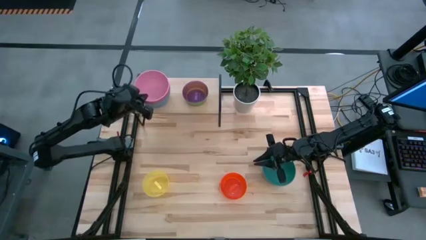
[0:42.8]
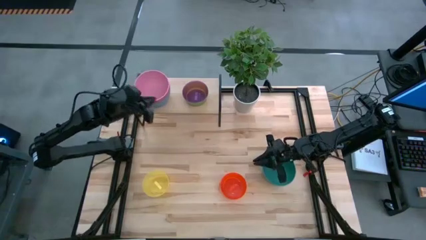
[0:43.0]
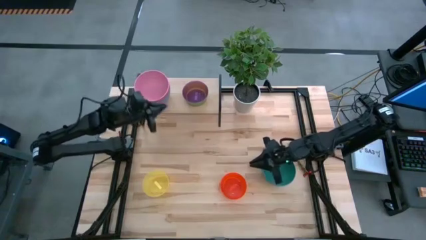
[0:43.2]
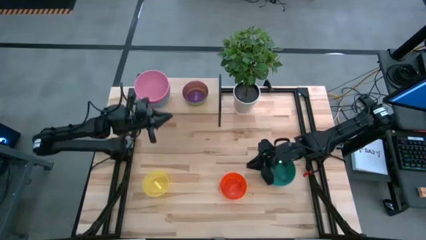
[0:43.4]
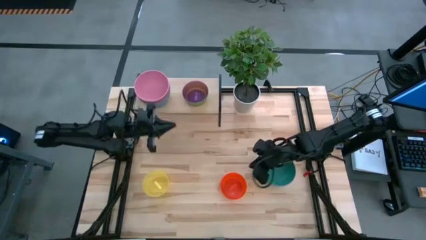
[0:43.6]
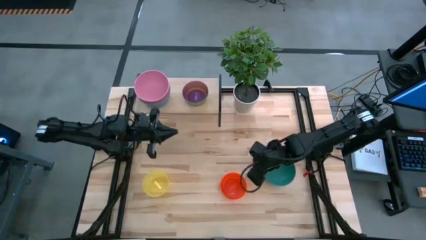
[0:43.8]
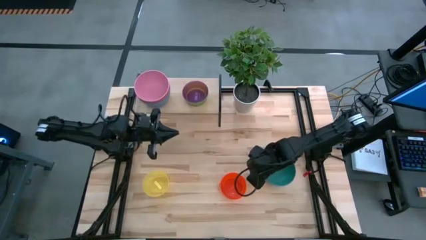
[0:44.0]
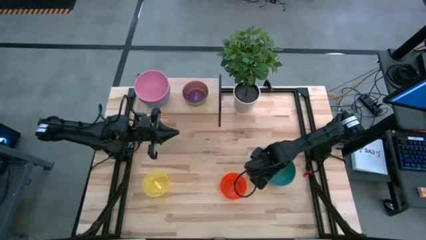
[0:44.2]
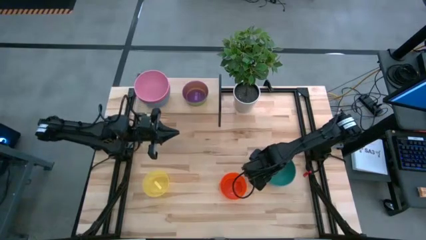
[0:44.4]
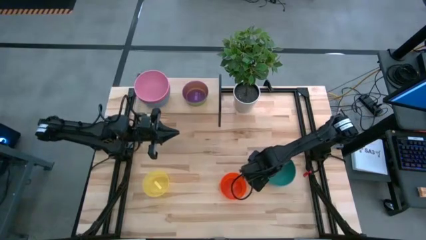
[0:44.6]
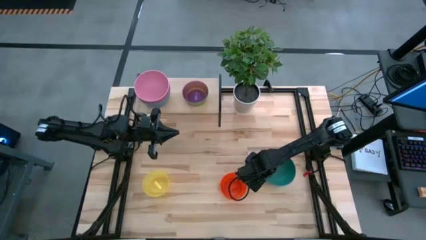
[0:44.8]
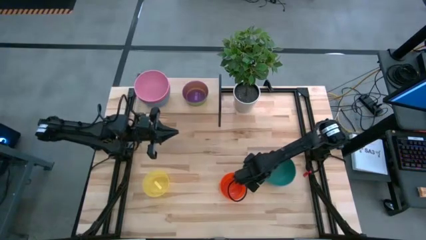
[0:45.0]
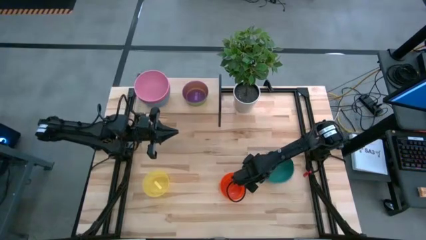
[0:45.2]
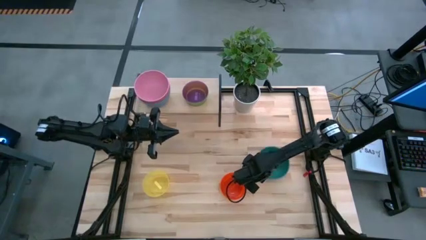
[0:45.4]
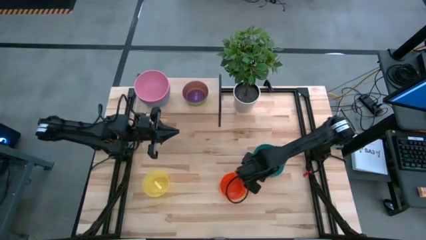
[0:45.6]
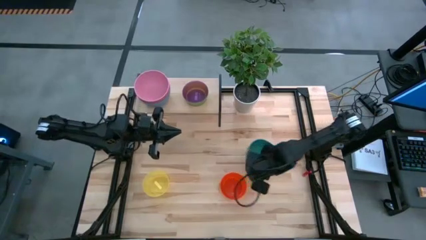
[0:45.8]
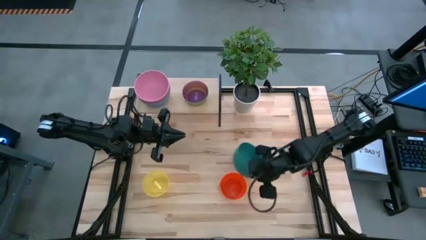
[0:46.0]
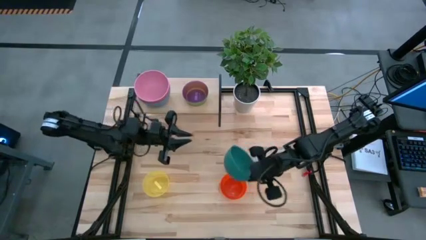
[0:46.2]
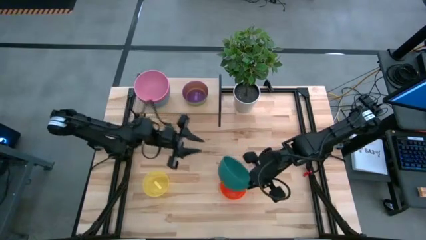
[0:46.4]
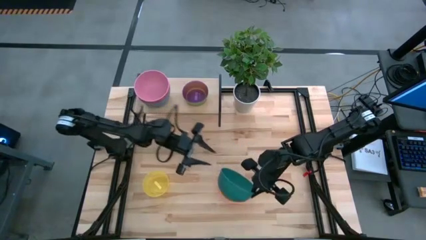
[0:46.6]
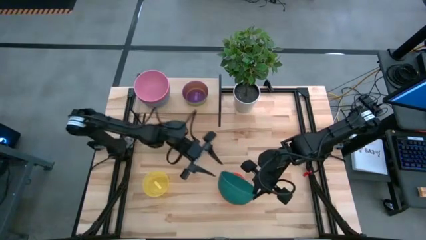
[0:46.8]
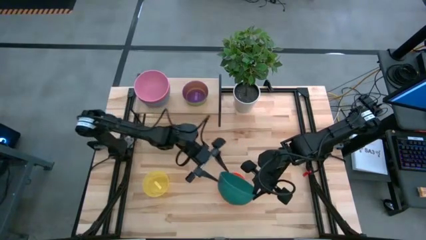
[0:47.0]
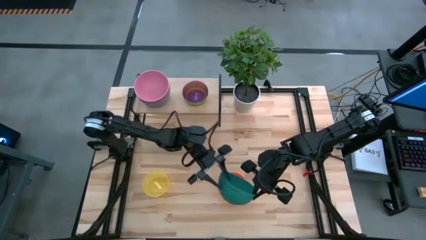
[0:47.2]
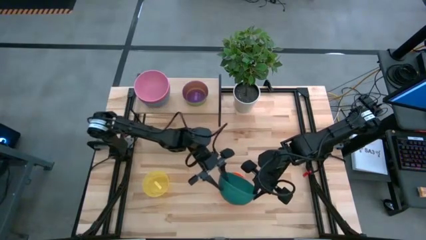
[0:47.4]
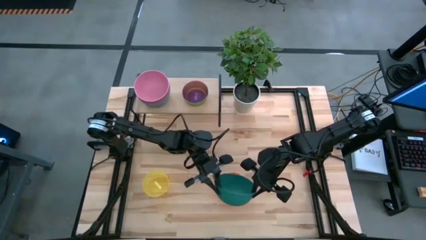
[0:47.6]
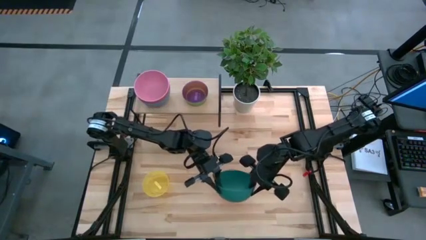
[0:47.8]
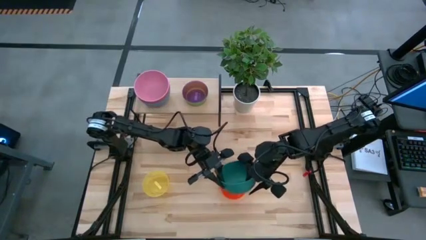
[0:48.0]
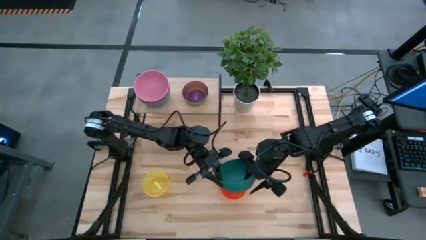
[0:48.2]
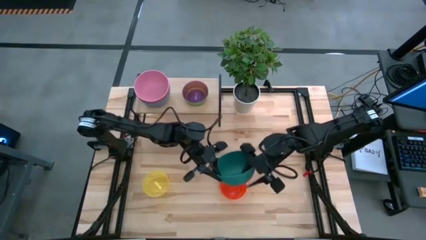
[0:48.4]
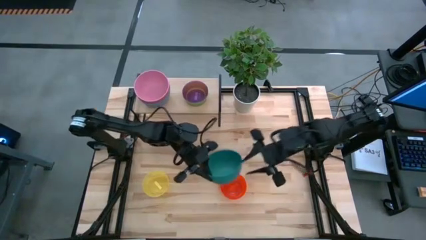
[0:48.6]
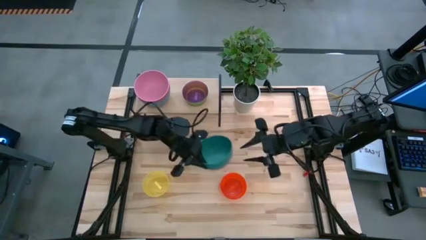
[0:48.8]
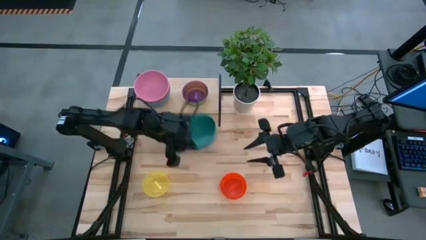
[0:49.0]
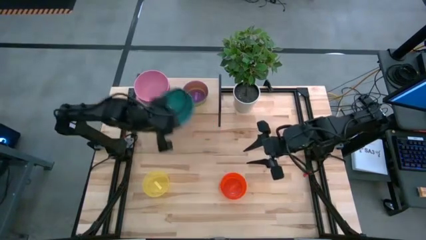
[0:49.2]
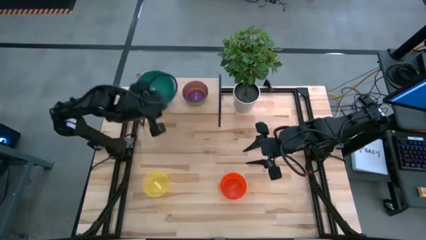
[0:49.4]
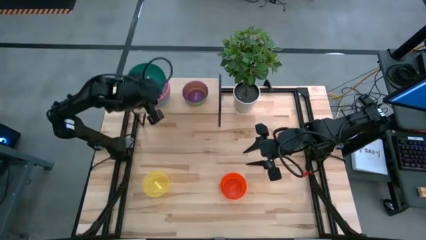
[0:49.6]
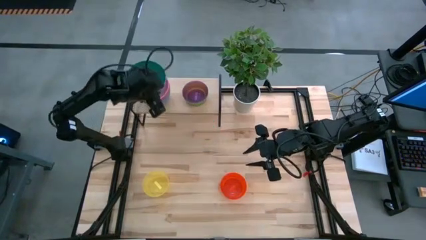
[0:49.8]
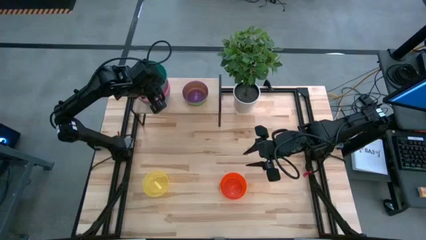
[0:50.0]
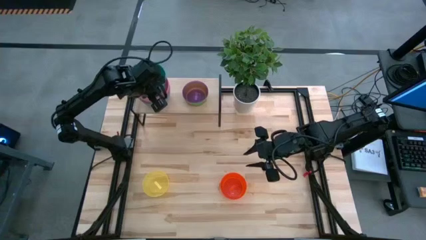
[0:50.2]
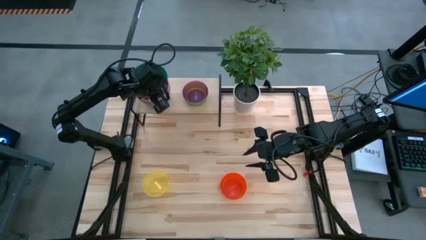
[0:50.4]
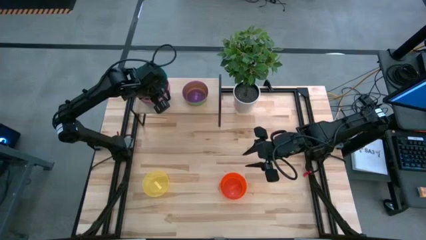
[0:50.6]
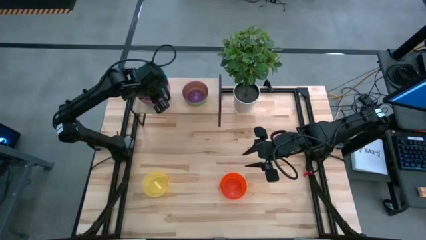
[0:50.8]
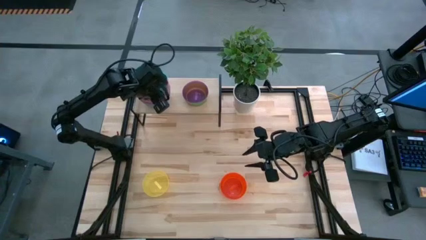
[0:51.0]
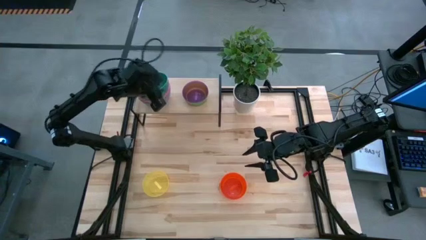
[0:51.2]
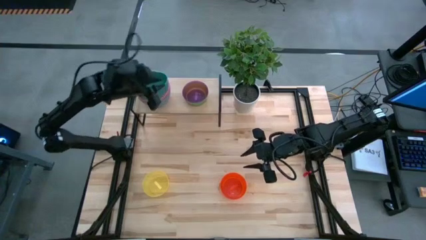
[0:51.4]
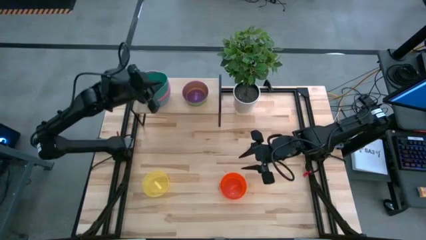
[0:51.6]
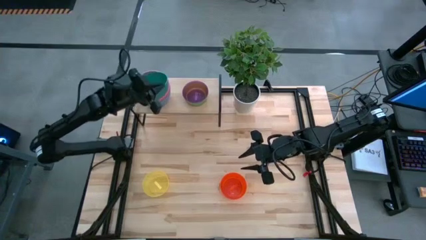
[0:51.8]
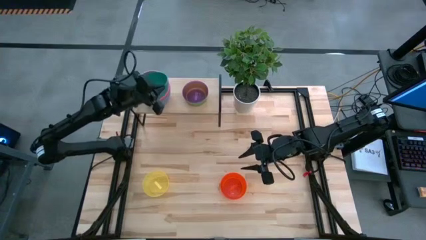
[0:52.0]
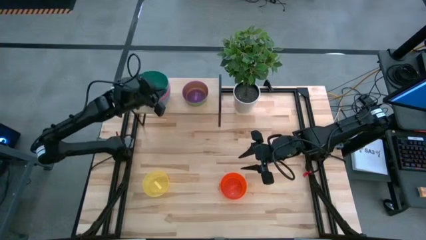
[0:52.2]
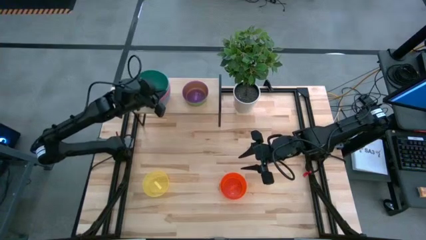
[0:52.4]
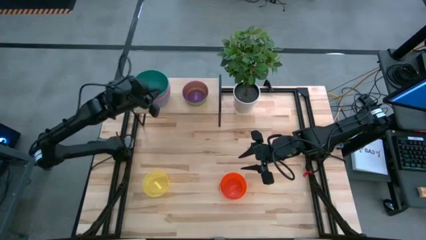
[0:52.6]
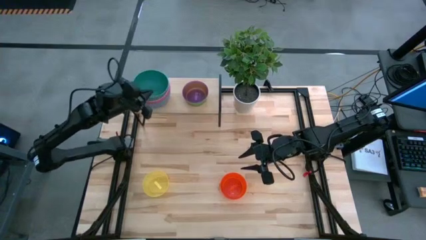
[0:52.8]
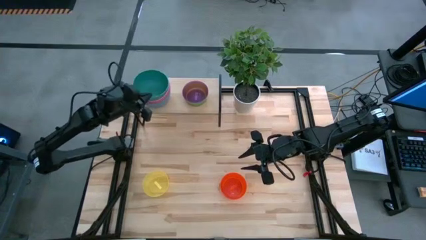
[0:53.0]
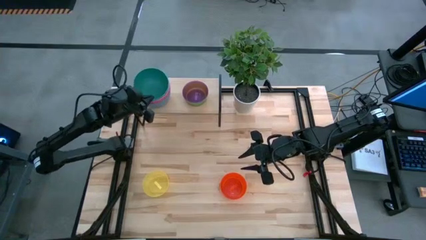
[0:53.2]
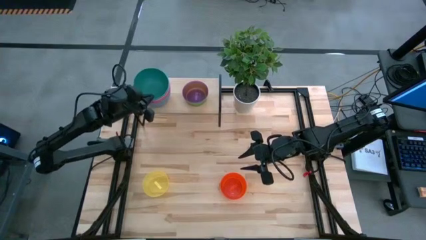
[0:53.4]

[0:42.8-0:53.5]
Task: Place and stack bowls onto a shelf
Stack the dark green bowl on top of the pink bowl on the shelf

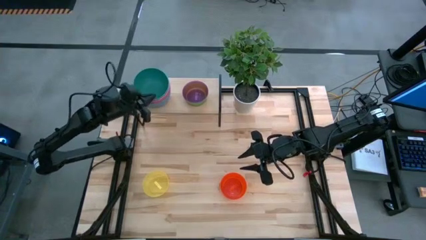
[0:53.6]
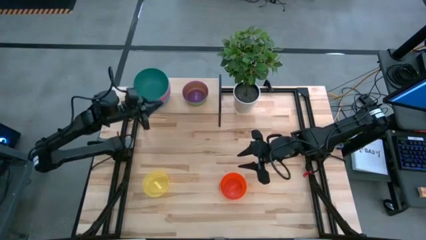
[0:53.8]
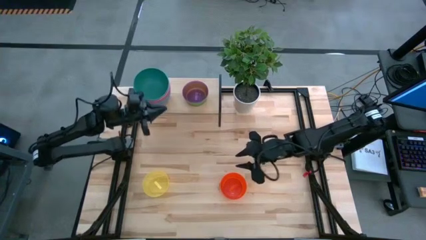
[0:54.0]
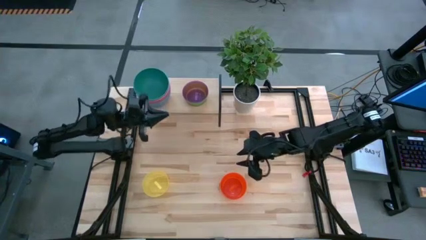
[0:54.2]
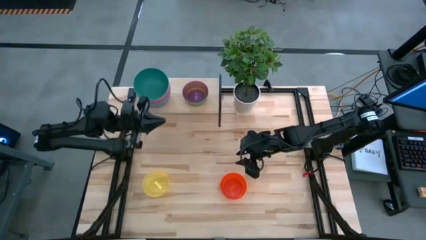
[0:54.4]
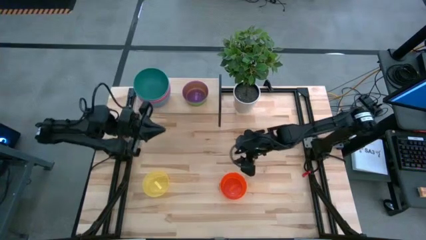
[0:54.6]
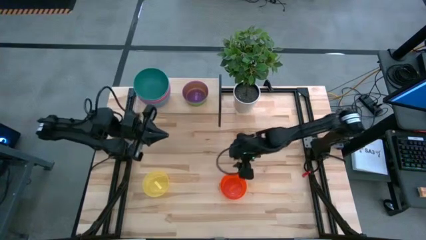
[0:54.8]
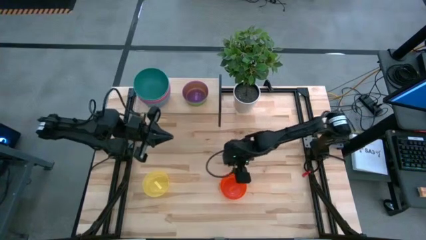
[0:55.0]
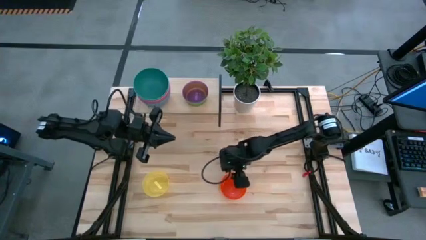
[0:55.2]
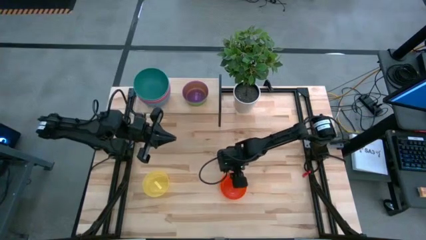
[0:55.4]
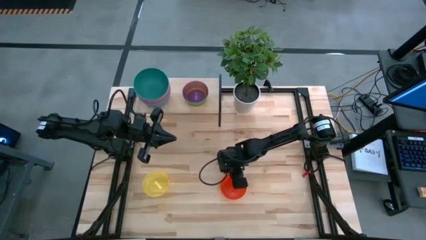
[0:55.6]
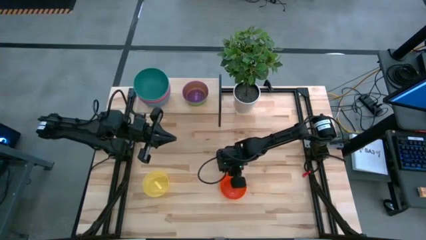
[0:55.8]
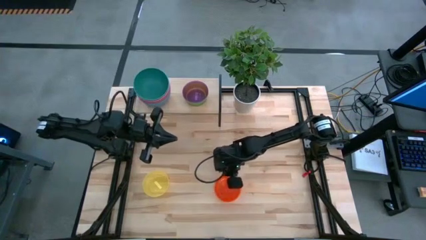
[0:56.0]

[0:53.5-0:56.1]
Stack the orange bowl on top of the violet bowl on the shelf

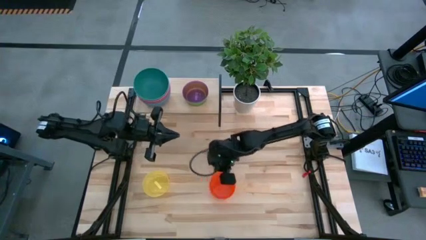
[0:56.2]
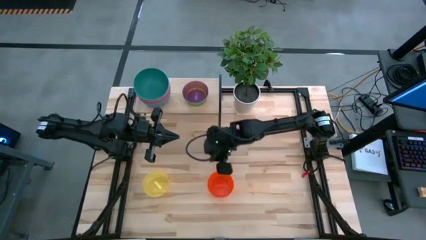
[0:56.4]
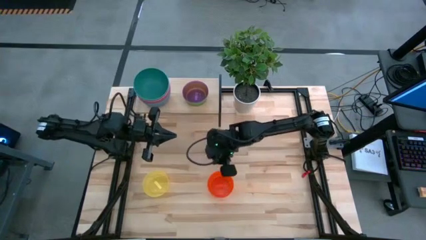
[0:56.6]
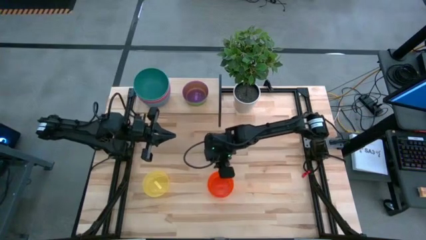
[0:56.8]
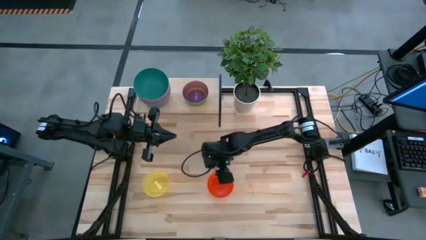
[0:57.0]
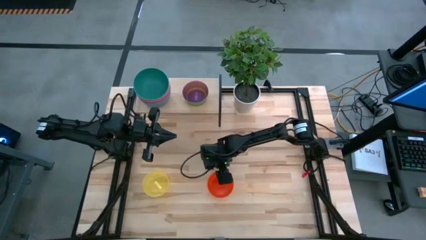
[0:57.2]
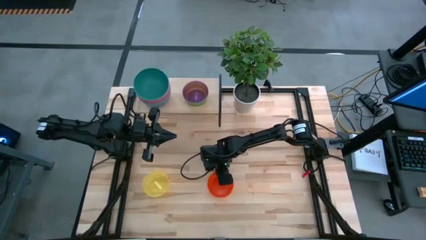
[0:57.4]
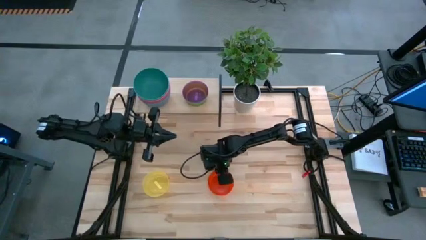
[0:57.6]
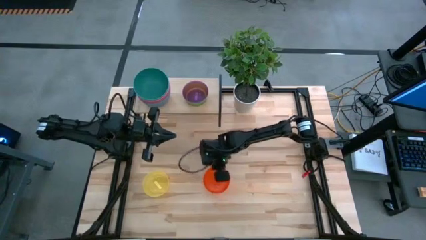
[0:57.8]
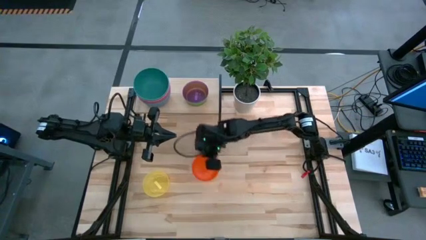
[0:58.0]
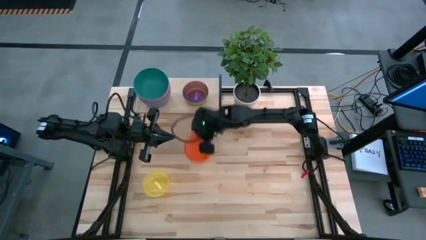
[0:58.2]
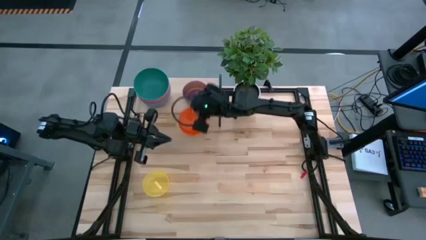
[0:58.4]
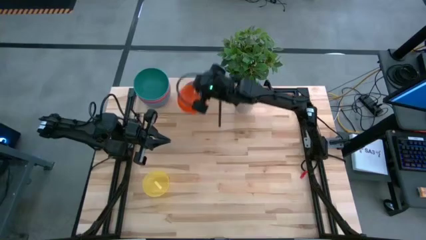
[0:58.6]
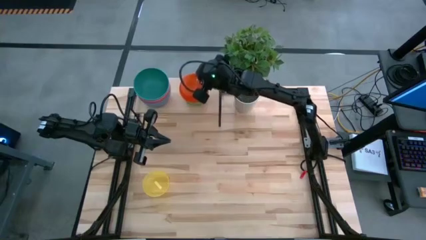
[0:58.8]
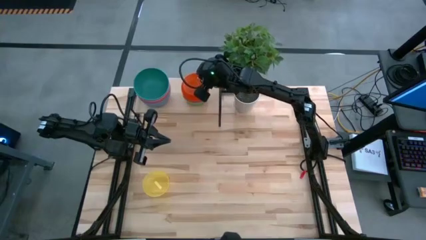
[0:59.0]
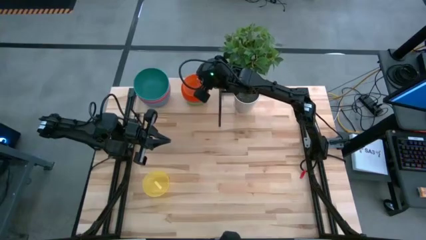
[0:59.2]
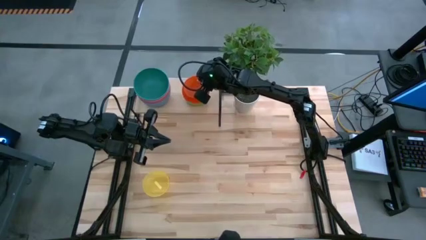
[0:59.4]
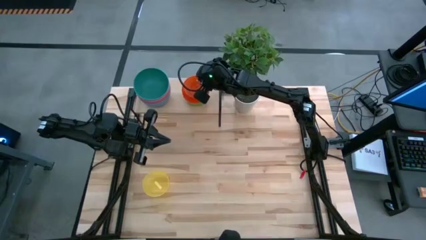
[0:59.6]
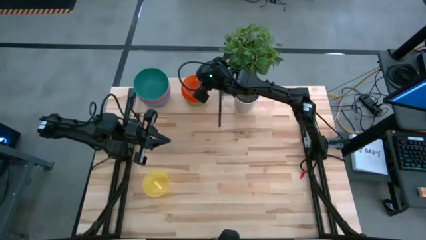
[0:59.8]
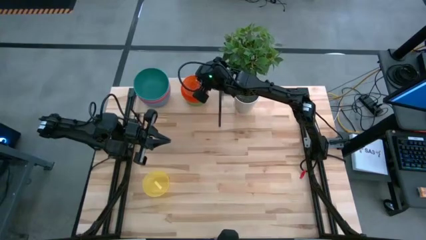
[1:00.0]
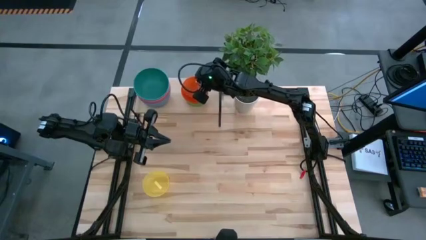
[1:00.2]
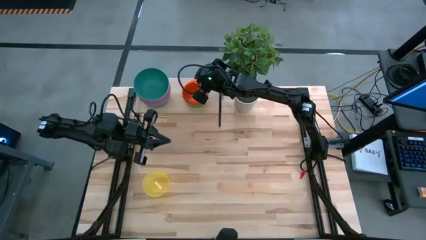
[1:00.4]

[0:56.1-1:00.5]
Stack the transparent orange bowl on top of the transparent violet bowl on the shelf
